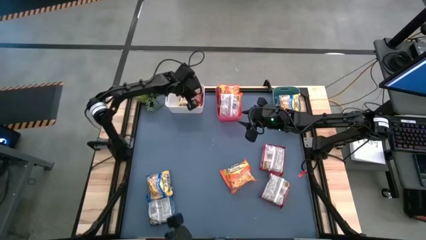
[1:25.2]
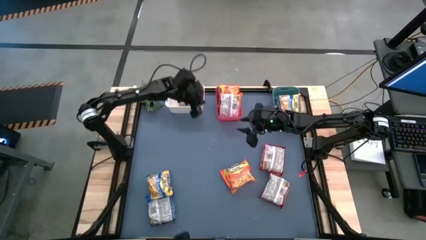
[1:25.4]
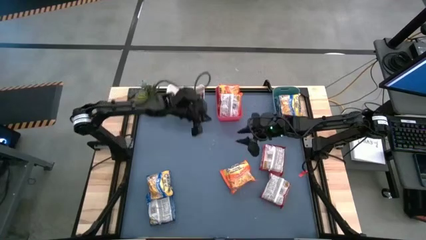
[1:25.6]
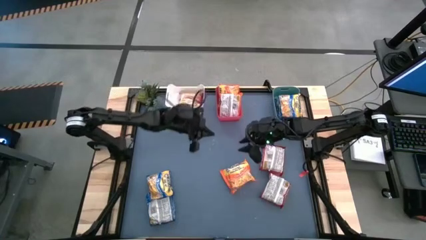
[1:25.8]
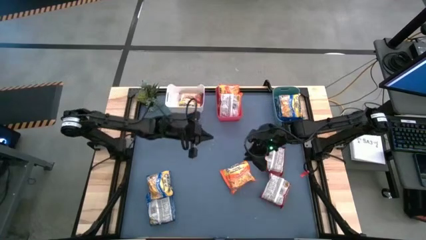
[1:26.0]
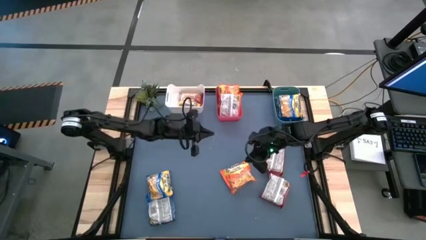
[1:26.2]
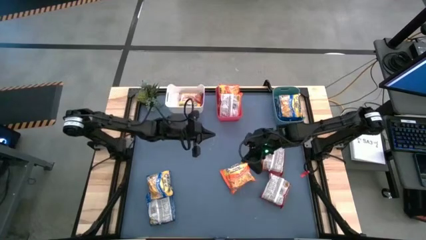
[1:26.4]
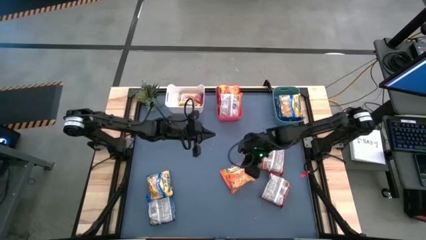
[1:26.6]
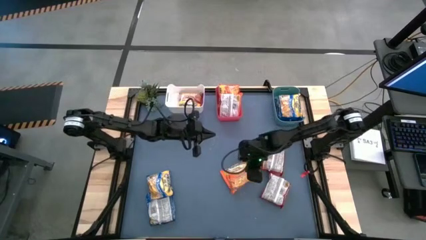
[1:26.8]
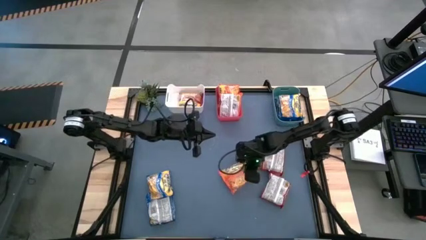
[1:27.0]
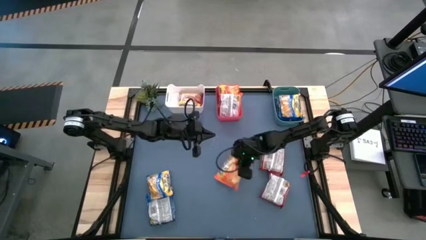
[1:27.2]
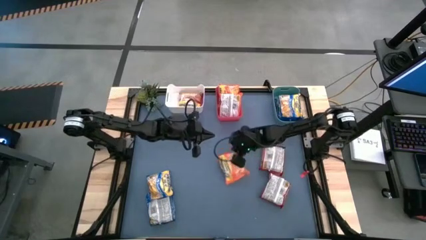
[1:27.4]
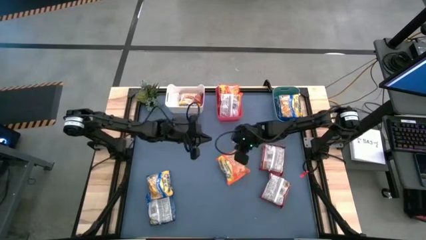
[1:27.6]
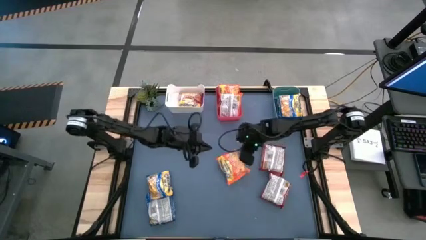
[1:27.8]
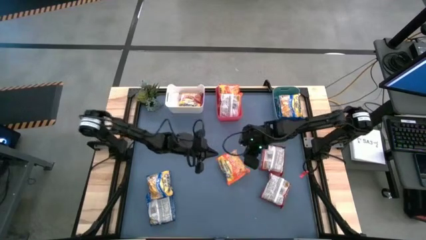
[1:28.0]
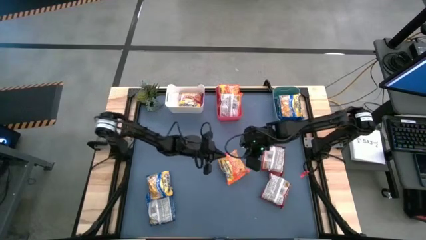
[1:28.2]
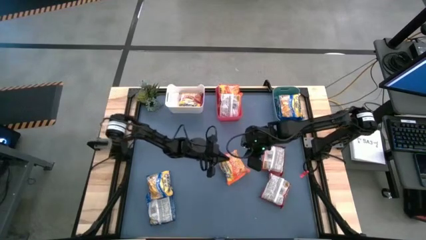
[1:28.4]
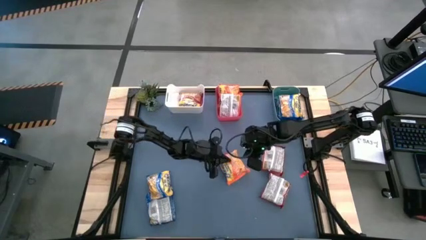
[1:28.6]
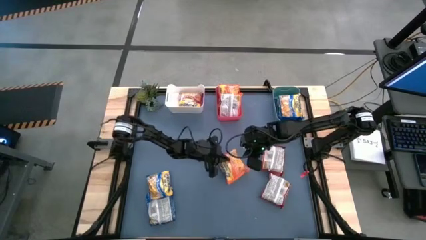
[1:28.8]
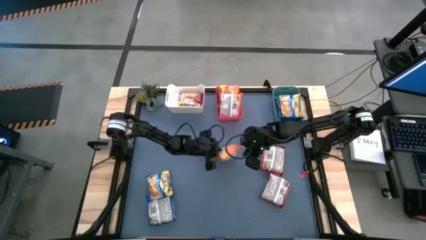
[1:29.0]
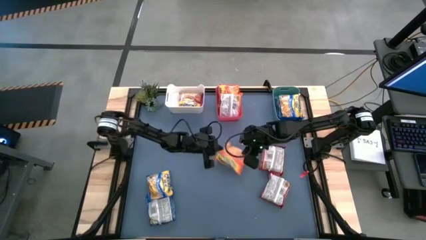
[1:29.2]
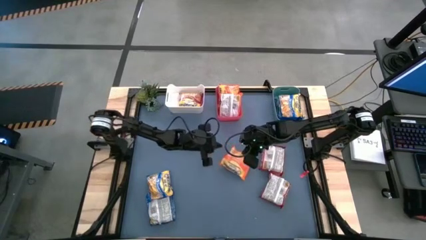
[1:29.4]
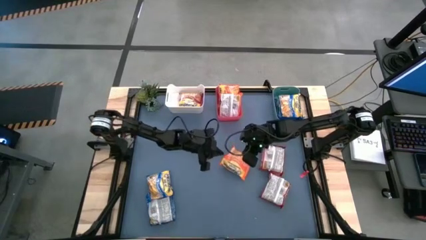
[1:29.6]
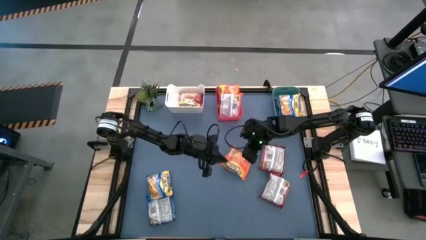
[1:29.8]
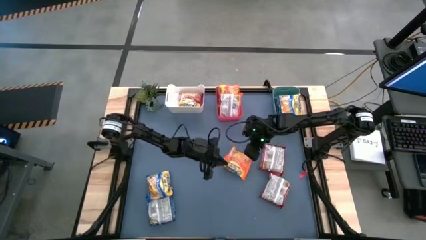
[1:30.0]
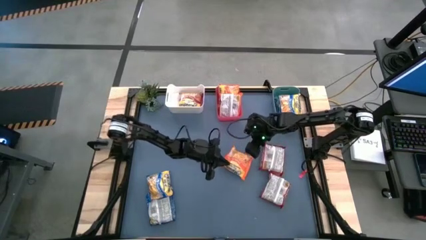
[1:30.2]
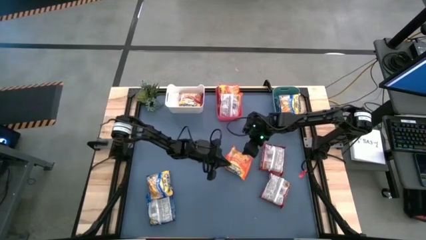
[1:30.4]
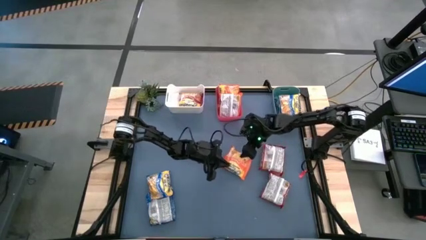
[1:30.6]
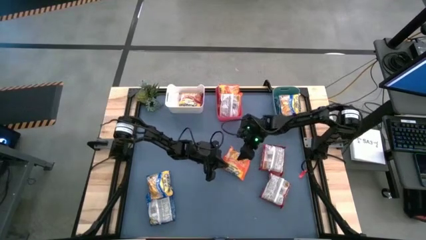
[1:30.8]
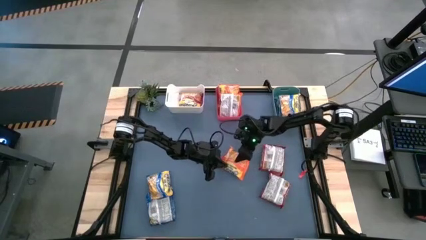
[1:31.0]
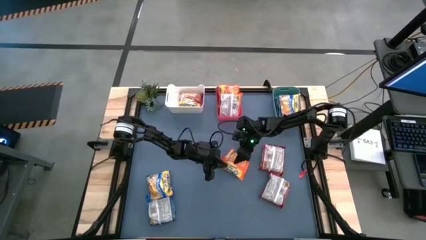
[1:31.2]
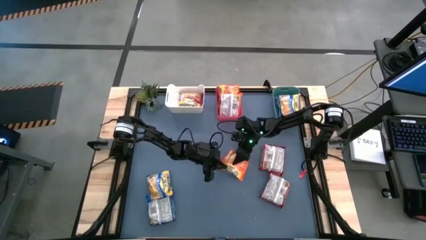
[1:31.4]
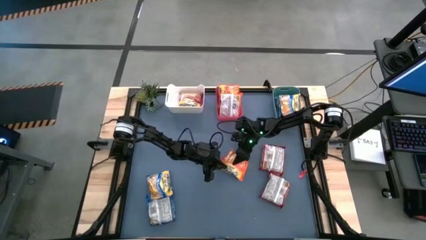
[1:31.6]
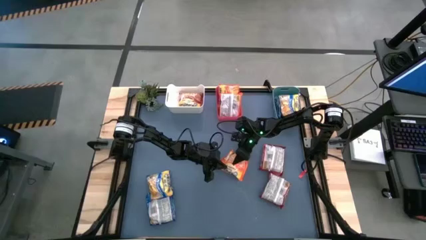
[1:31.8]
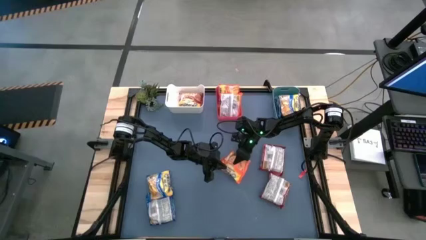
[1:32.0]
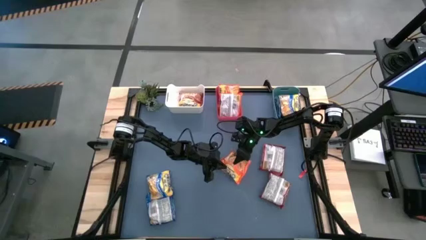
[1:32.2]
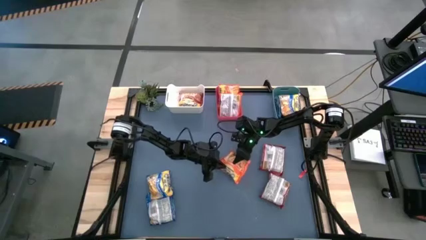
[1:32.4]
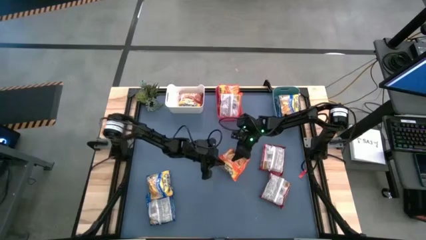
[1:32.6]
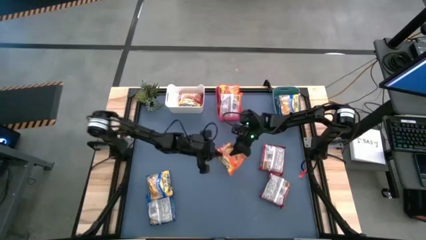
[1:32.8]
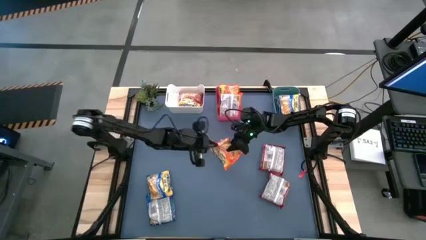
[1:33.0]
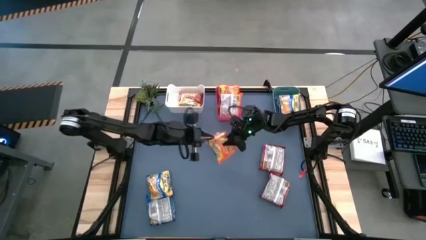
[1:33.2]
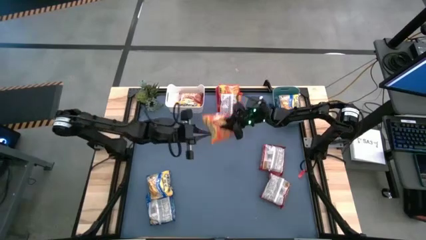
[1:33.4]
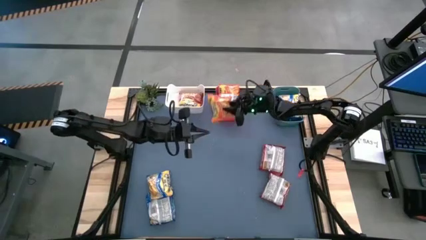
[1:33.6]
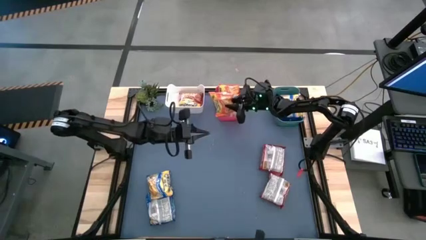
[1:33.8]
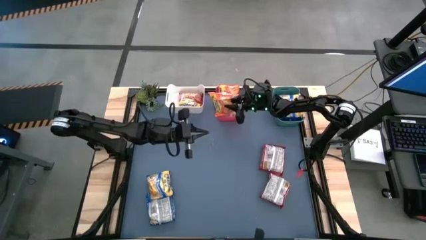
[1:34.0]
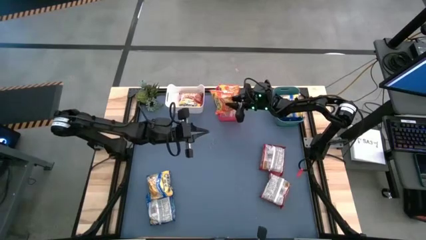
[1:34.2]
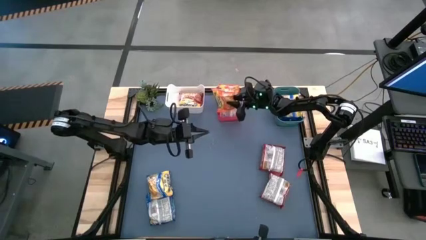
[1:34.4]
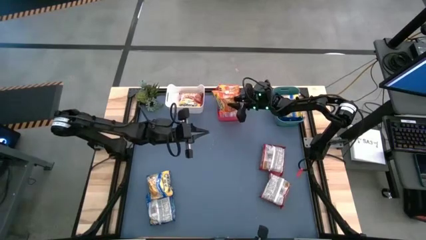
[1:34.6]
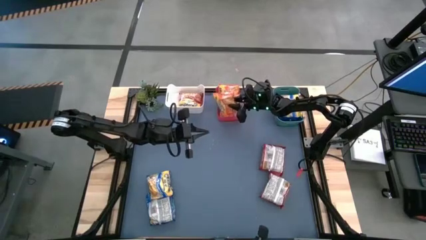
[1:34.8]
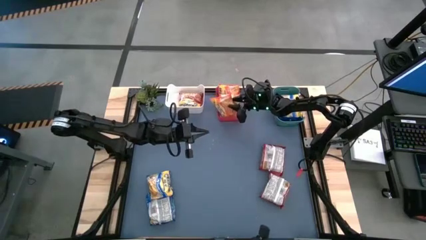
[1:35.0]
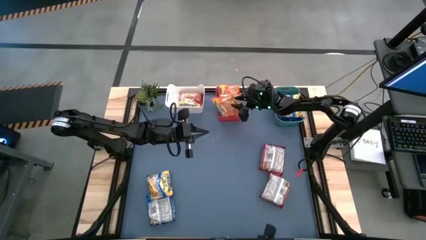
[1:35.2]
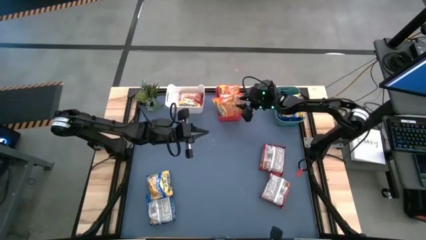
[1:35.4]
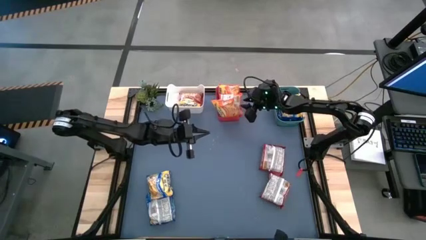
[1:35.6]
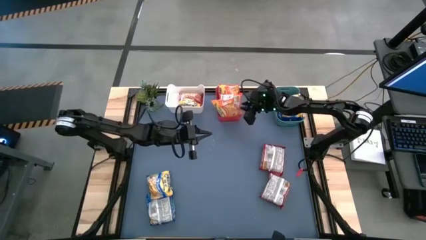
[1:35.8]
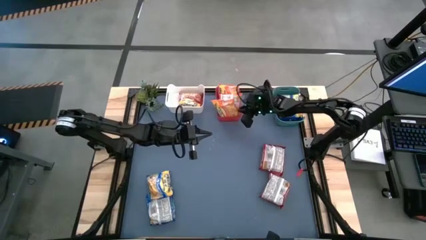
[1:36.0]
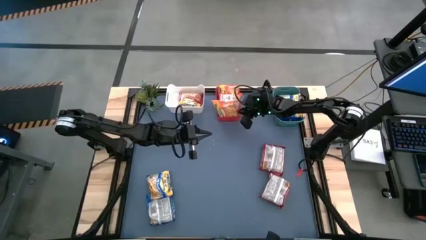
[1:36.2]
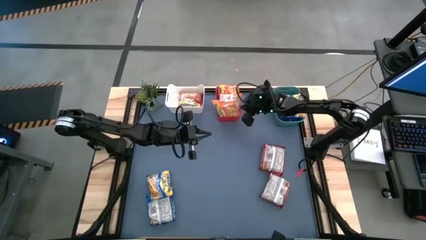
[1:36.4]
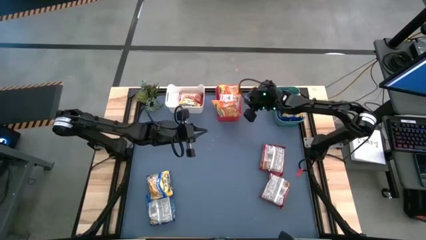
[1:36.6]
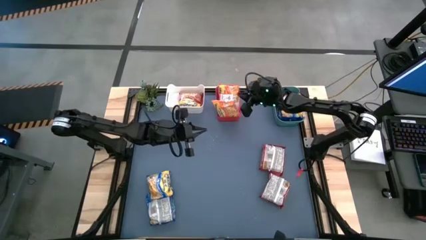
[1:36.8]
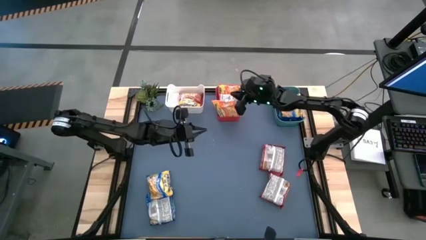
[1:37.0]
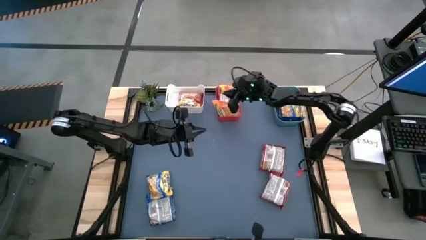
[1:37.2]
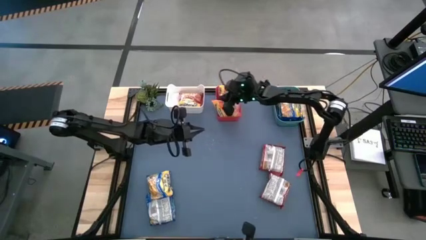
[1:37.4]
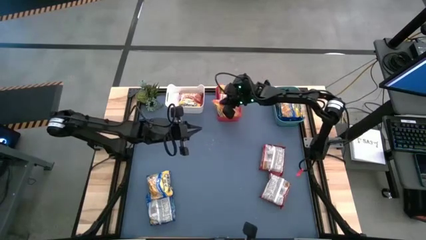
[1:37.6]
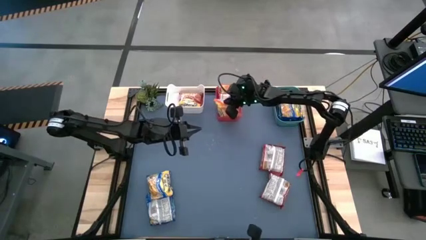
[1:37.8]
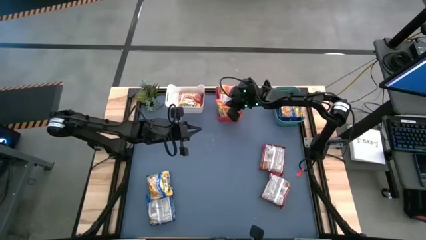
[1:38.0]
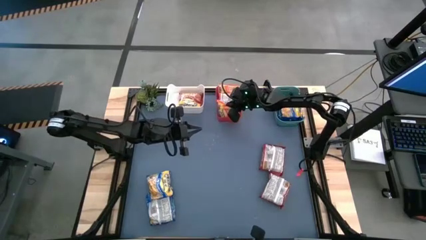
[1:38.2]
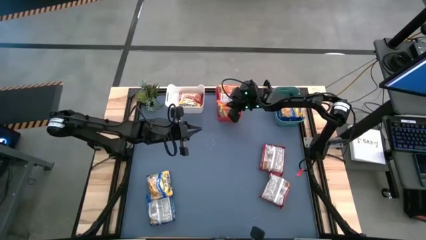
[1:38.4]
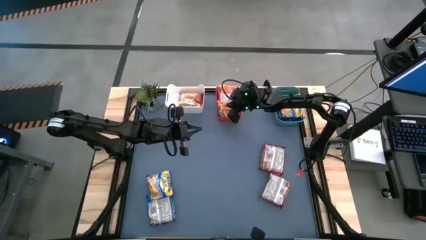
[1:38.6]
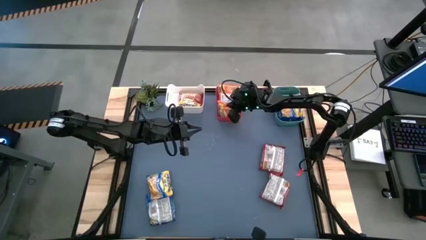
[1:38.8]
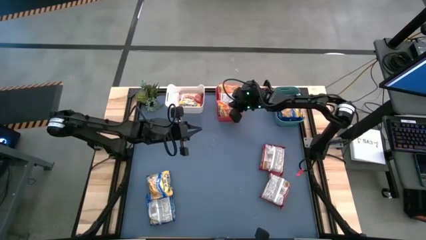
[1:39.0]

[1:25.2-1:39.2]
Task: Sort Maruchan noodles
Put the orange noodle pack into the red bin
